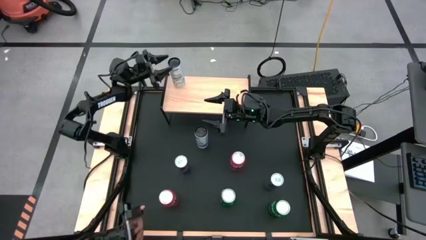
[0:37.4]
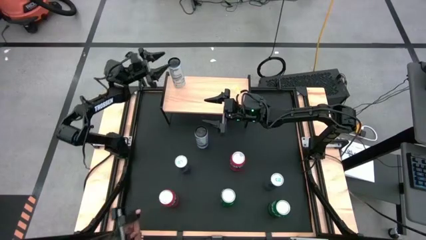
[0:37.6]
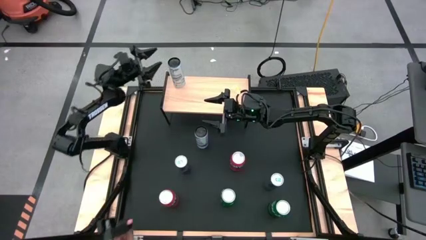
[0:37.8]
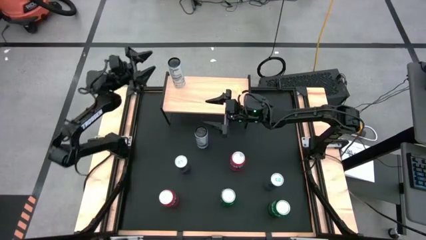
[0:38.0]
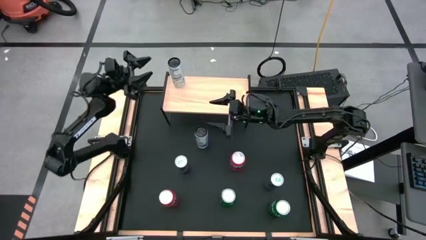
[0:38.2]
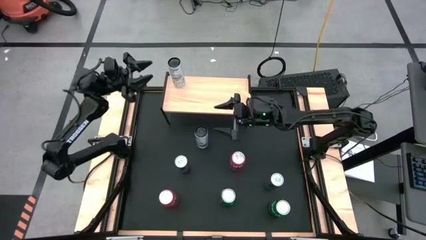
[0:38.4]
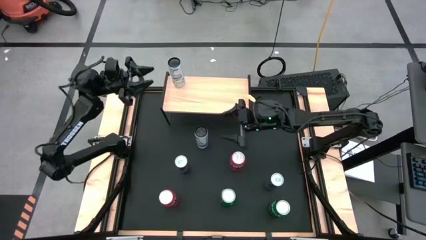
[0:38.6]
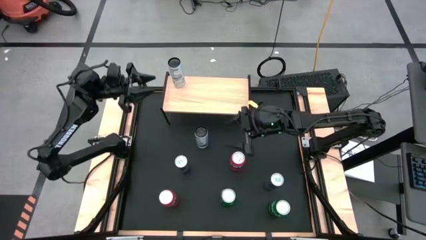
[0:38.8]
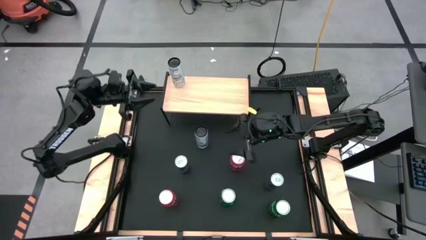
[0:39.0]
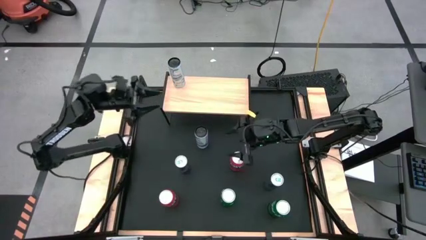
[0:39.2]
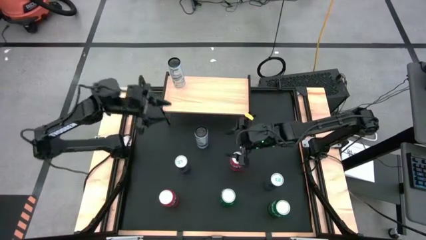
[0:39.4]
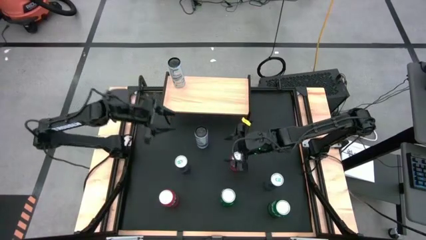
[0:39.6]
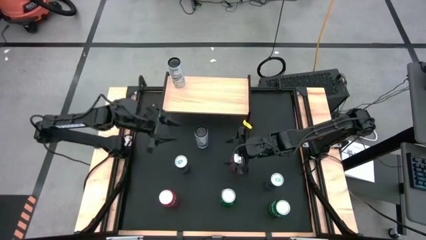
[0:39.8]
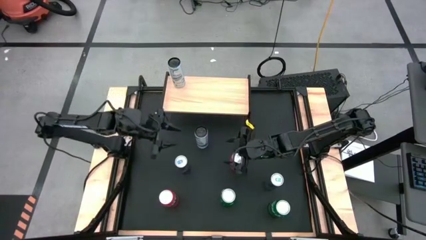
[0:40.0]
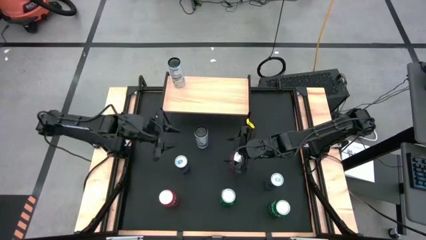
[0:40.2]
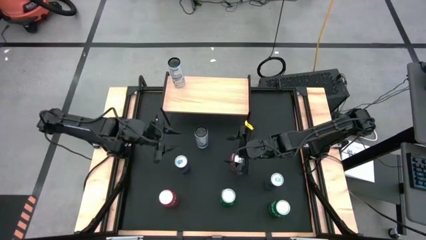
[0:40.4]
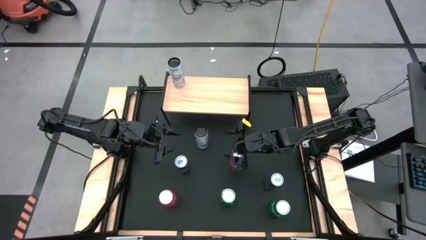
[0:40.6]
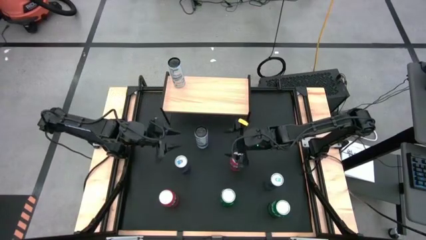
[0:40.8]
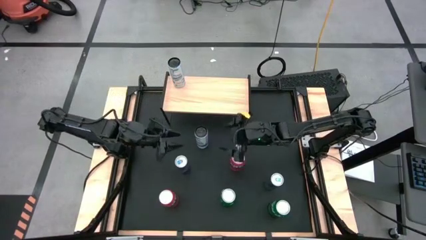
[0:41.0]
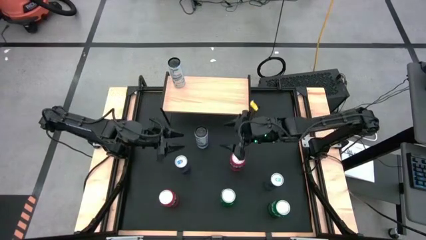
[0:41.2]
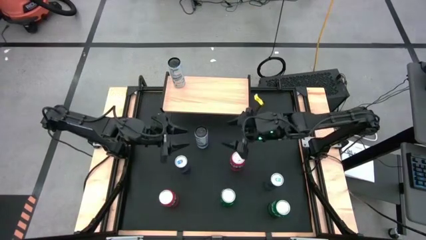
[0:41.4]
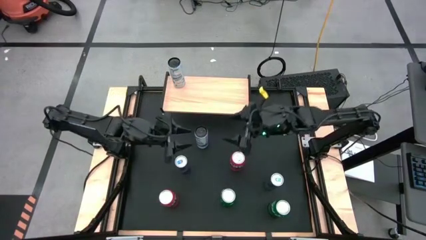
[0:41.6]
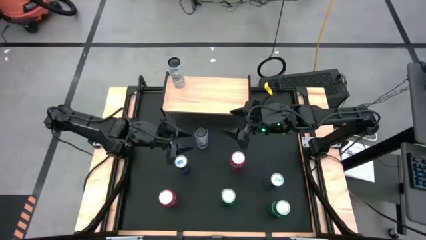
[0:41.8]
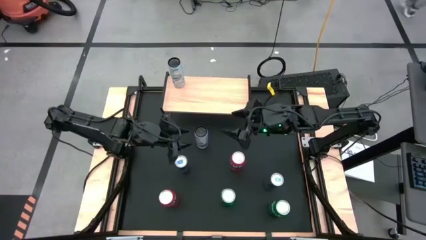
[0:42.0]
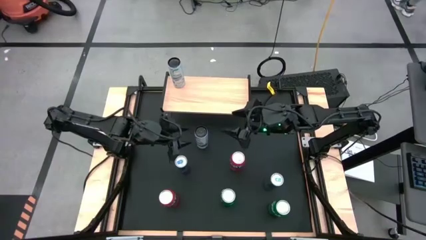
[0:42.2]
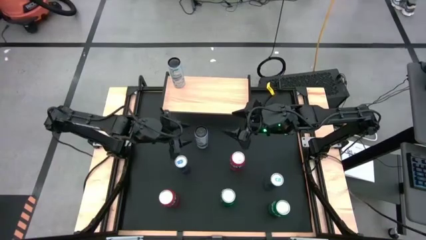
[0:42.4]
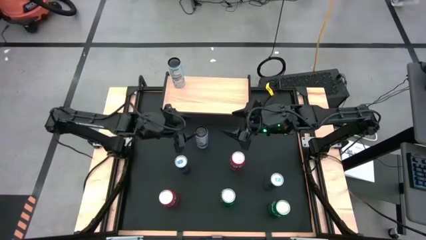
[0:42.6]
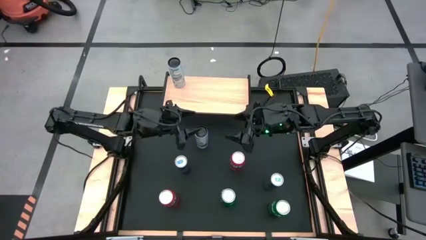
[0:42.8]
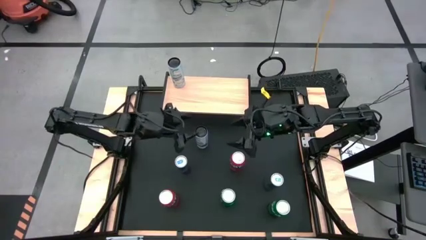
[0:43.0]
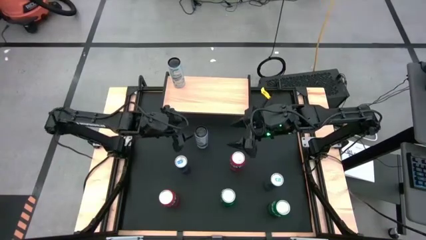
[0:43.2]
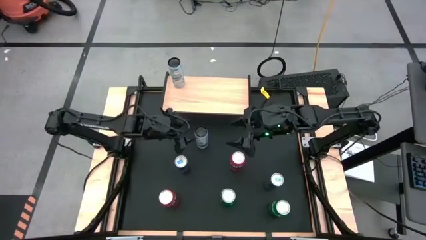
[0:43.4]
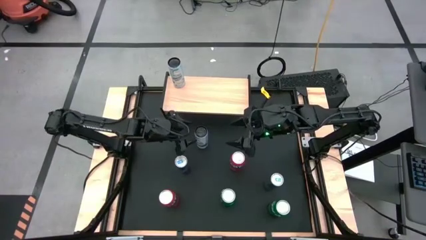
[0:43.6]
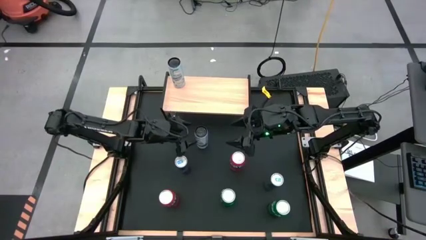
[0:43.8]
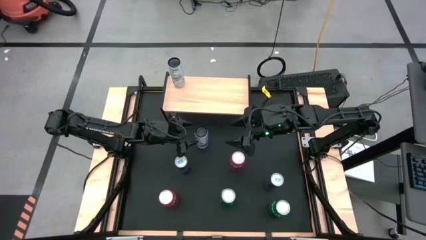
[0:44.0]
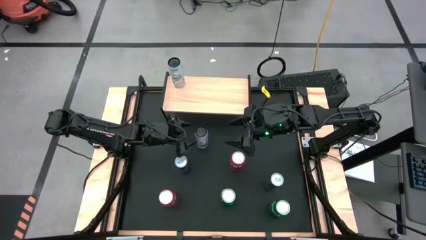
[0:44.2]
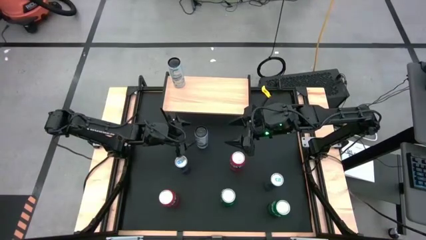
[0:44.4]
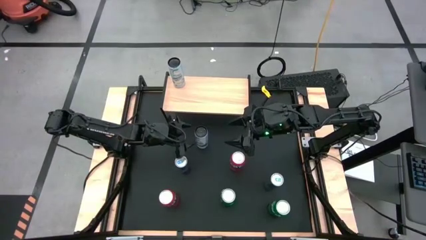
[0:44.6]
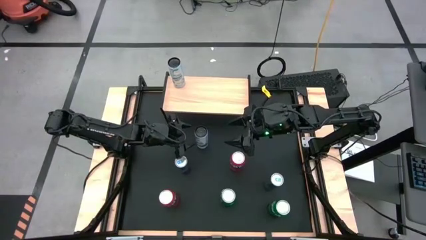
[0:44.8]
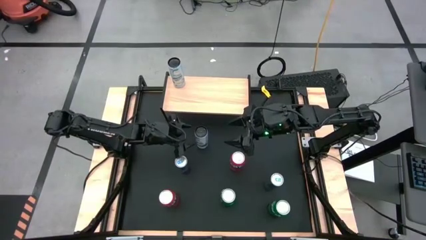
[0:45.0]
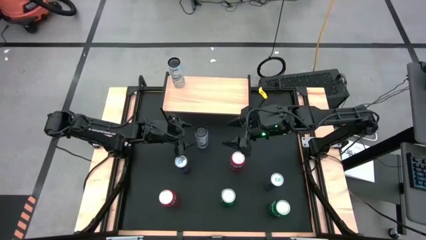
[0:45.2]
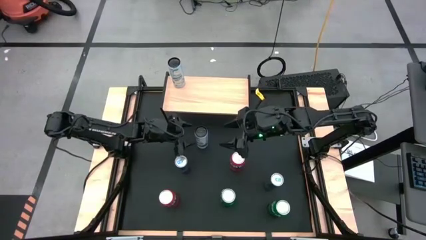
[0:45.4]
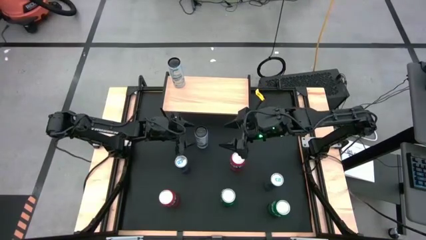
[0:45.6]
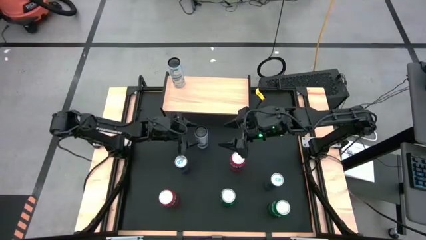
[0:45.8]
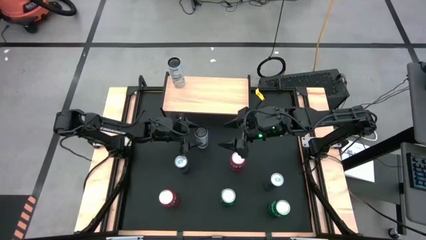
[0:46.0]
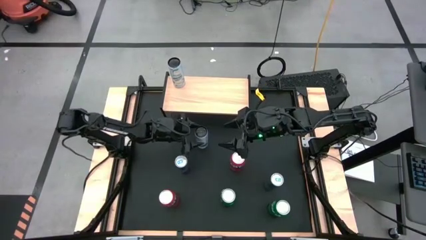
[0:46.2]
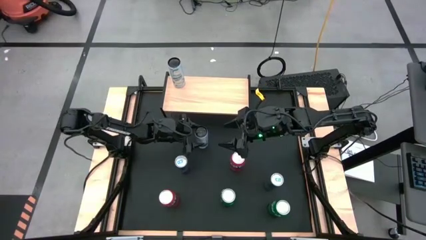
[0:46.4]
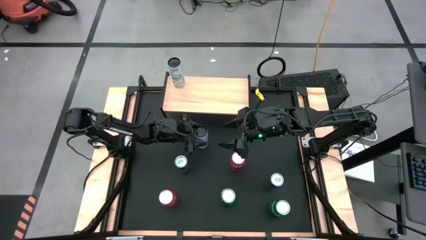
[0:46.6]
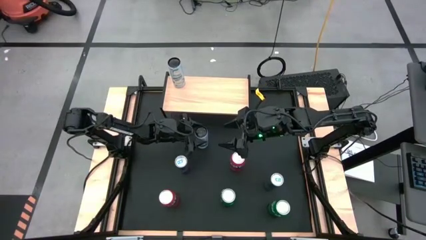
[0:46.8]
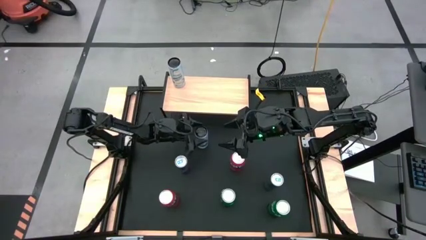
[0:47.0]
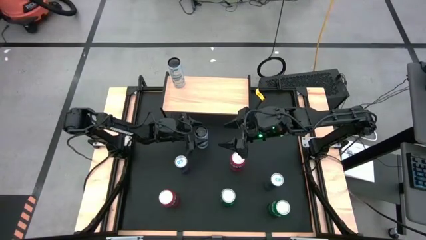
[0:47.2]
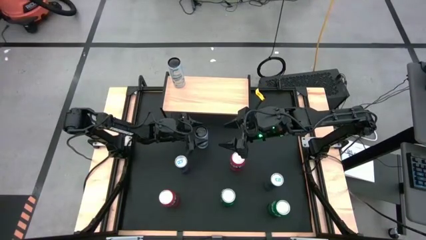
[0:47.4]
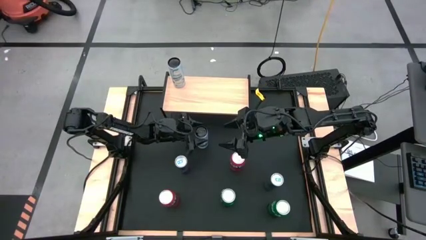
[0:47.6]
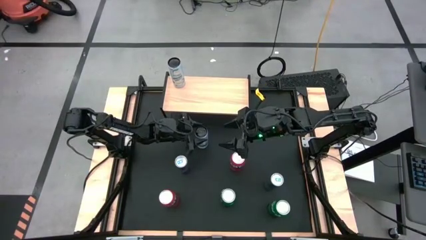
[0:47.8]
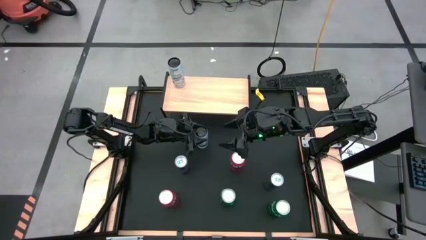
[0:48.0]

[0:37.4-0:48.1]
Task: Place canned beverage on shelf
Put the white-blue soda can, aligned with the other white-blue soda can on the shelf

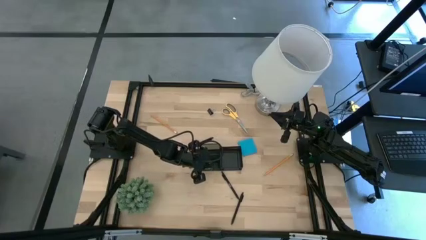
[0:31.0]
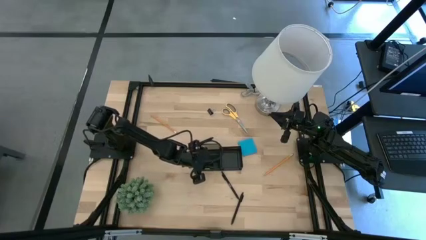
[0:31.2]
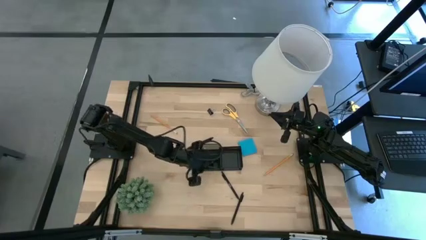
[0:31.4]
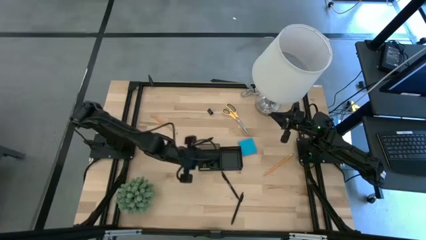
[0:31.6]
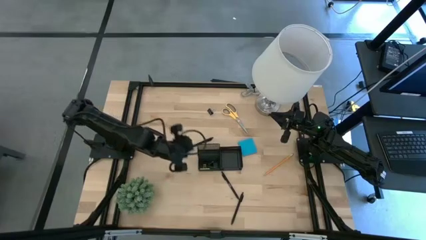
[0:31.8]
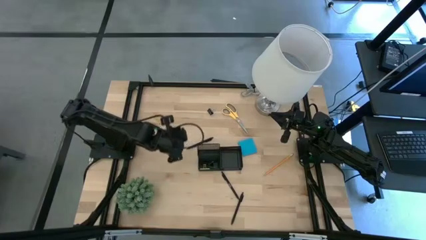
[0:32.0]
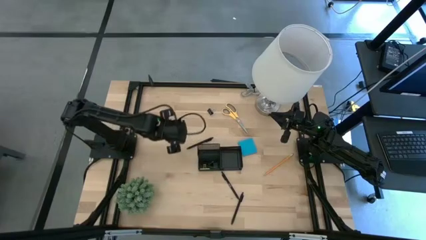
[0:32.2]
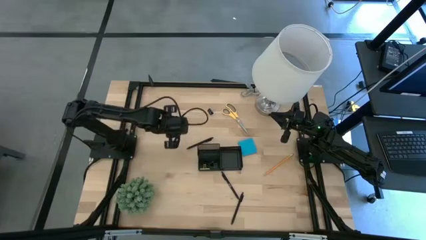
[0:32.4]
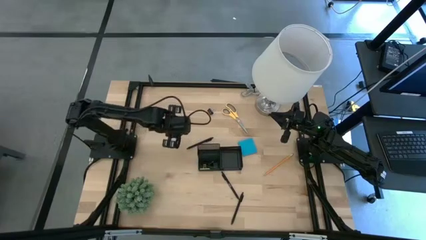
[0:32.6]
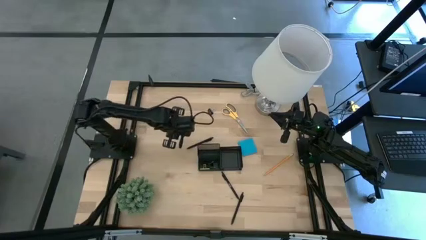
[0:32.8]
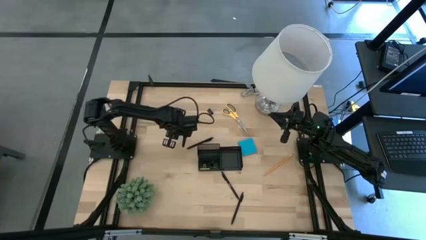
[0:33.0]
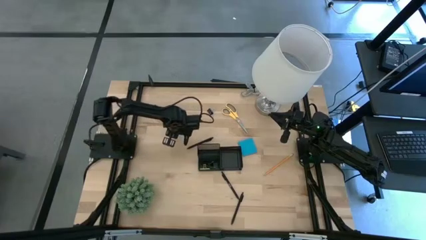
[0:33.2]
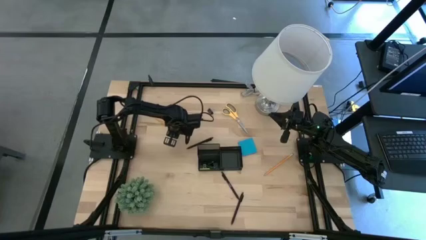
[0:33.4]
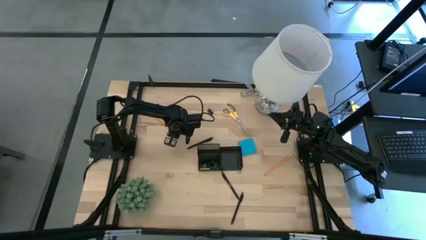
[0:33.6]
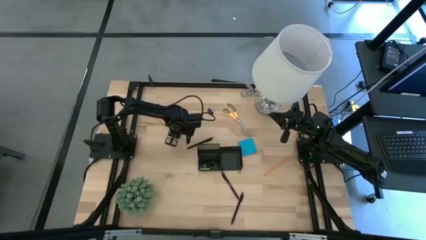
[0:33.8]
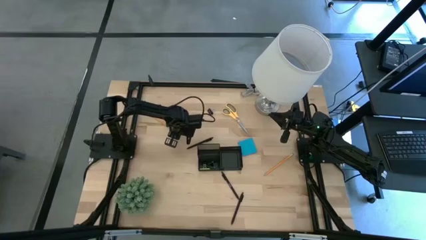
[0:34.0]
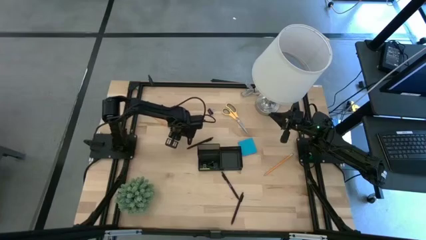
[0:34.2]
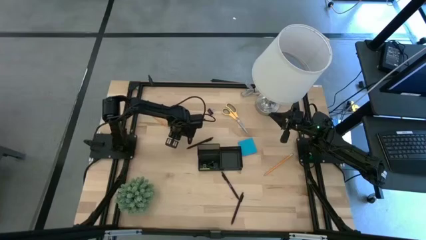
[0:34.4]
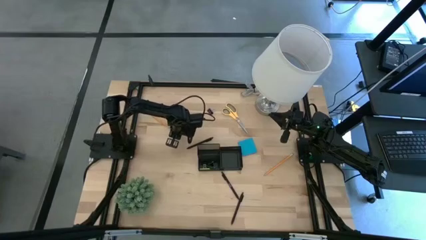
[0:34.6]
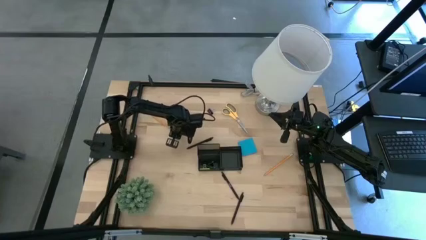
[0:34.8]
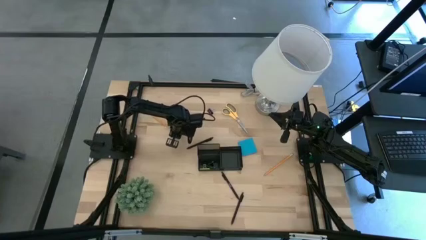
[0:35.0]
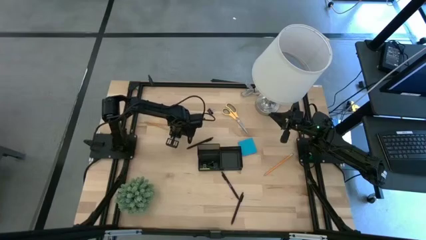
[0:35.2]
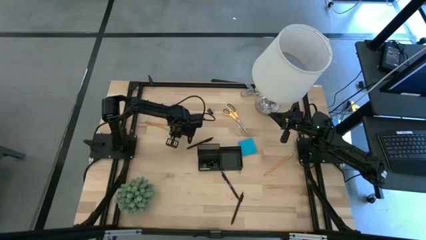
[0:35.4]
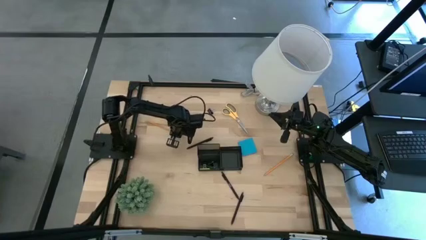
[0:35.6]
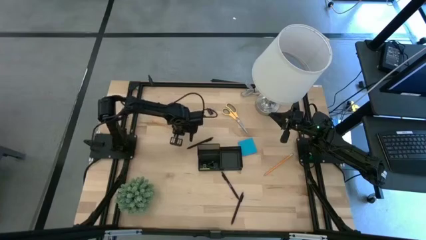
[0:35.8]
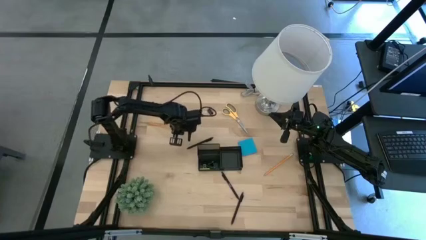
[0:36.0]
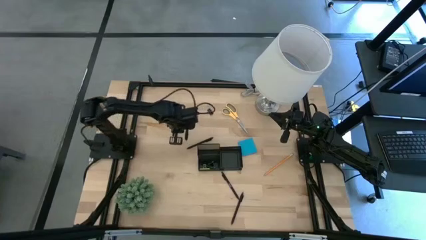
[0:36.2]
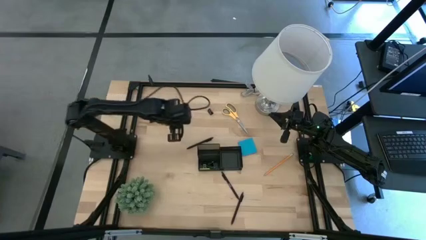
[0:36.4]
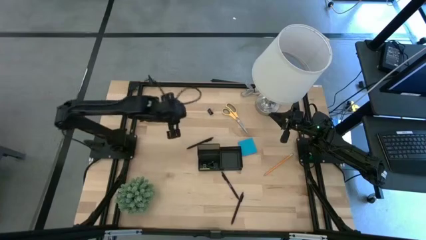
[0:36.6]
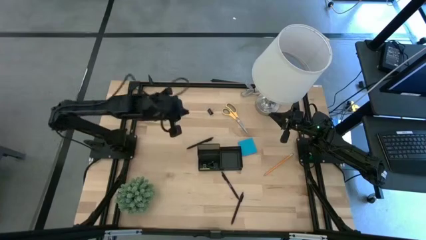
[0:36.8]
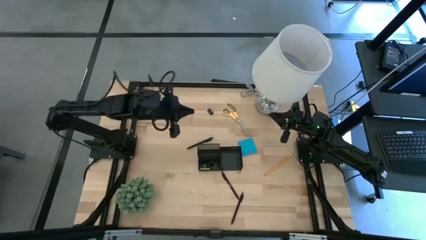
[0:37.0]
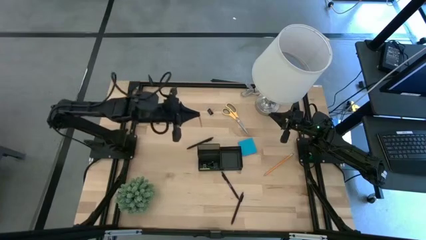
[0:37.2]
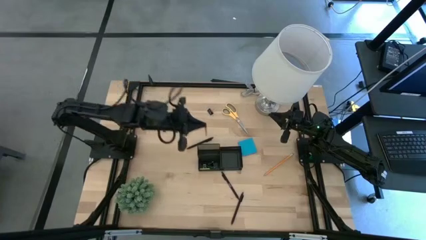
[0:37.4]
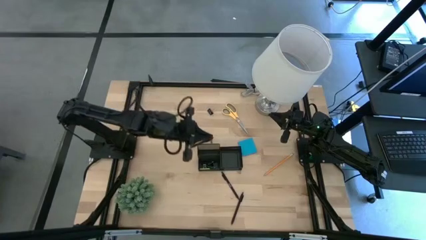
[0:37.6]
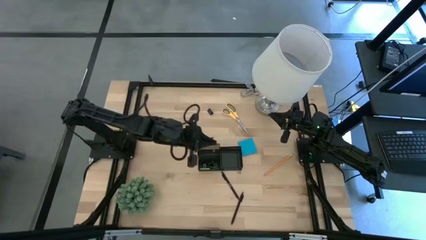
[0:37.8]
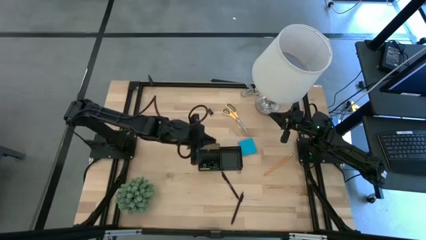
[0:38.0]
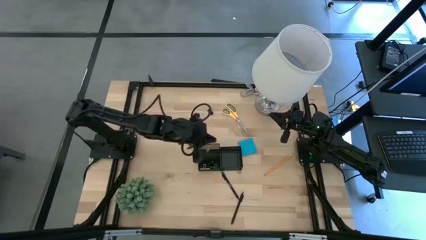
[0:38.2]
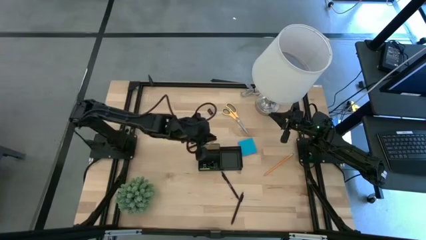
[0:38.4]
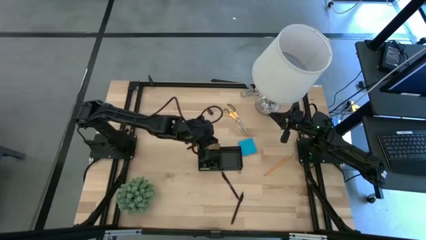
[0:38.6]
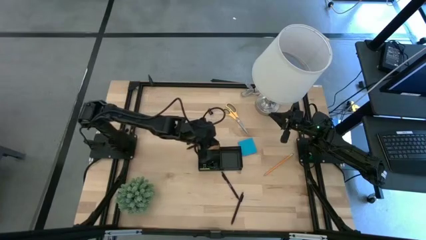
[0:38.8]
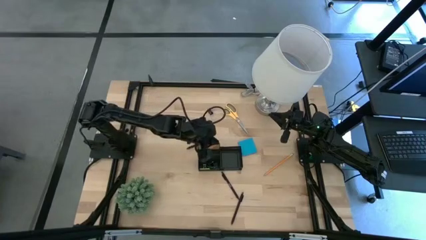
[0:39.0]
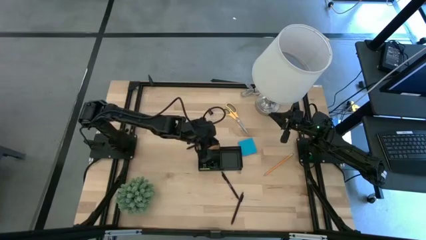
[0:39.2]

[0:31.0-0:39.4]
Task: Pick and place office supplies into organizer
Put the top orange pencil into the desk organizer
